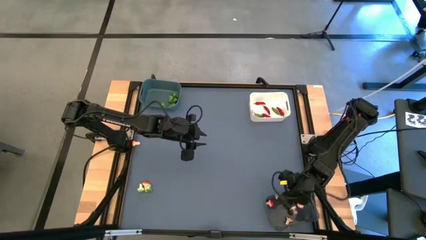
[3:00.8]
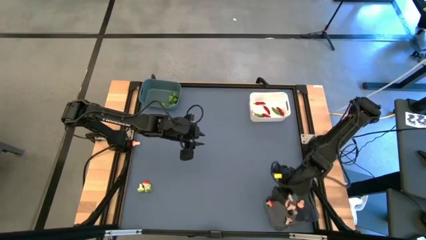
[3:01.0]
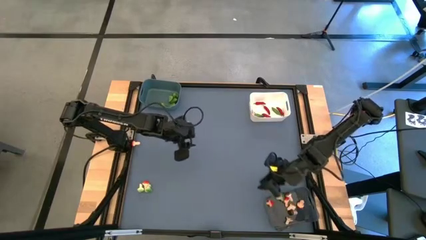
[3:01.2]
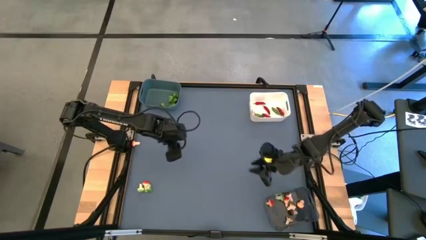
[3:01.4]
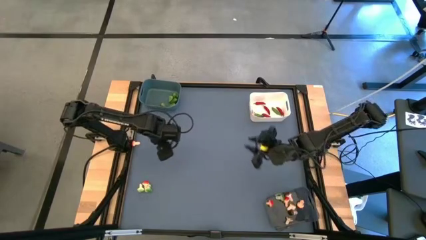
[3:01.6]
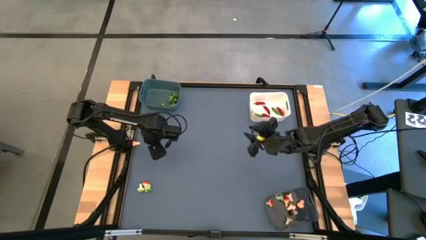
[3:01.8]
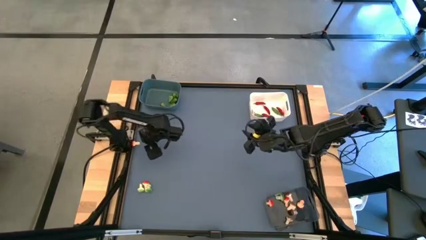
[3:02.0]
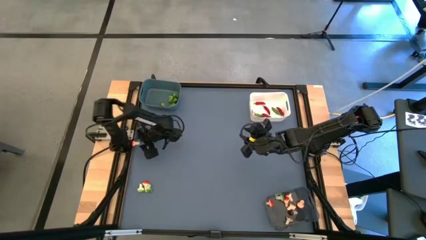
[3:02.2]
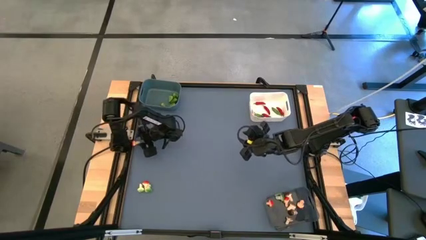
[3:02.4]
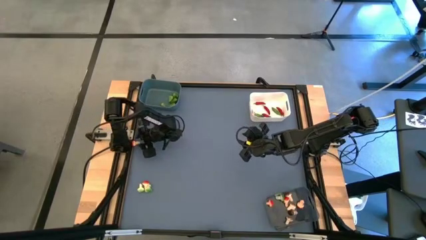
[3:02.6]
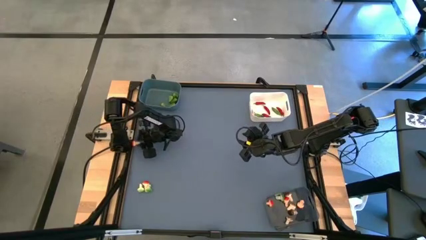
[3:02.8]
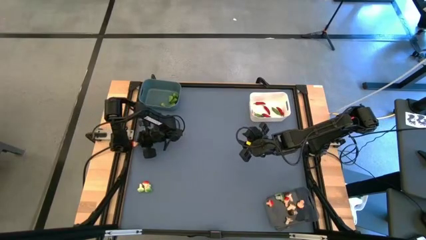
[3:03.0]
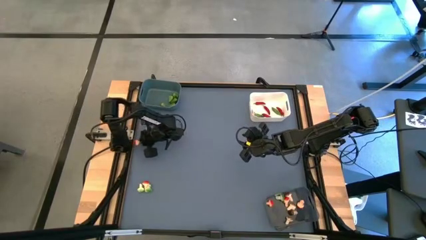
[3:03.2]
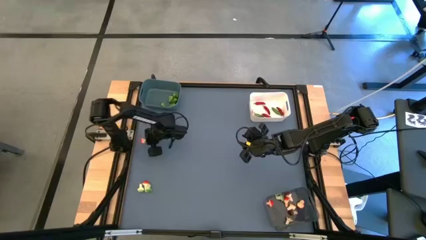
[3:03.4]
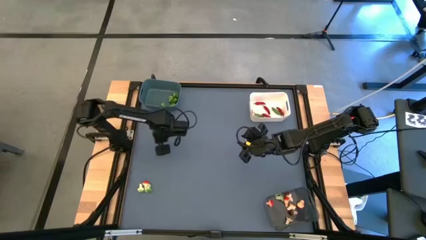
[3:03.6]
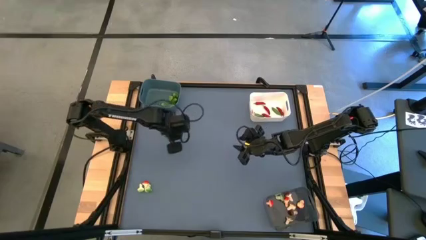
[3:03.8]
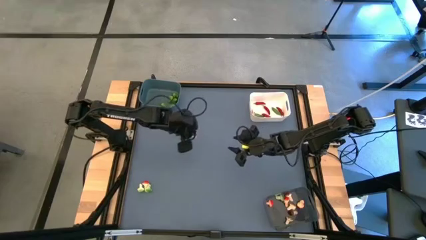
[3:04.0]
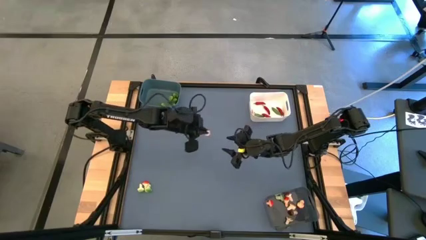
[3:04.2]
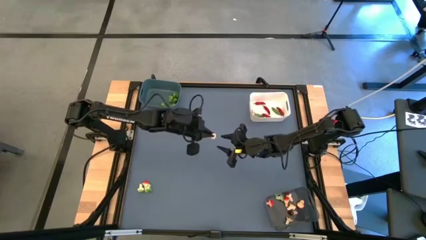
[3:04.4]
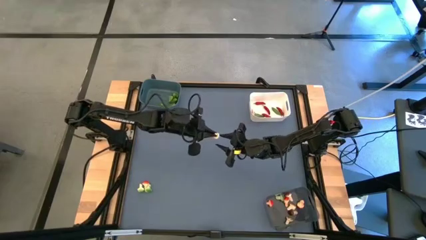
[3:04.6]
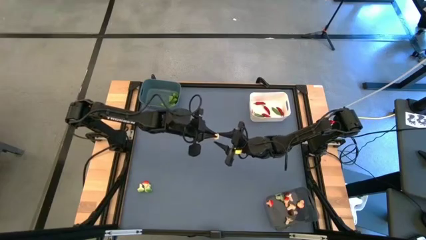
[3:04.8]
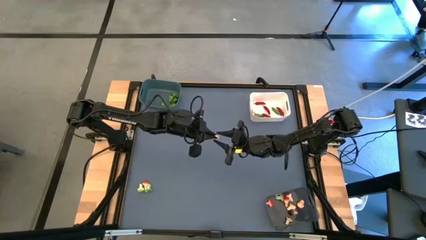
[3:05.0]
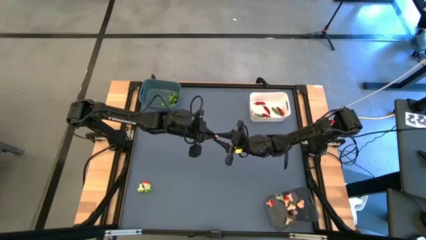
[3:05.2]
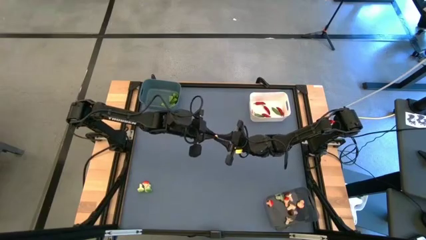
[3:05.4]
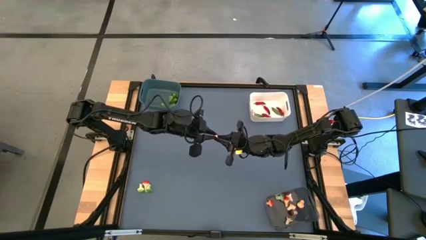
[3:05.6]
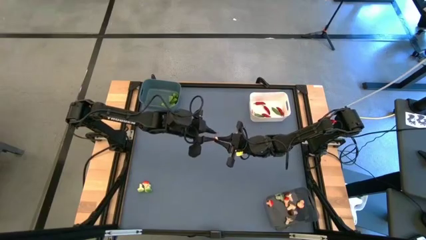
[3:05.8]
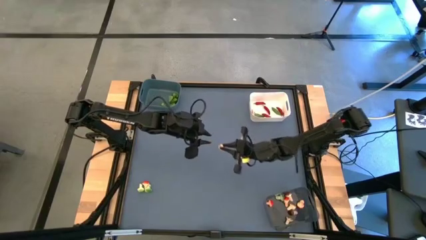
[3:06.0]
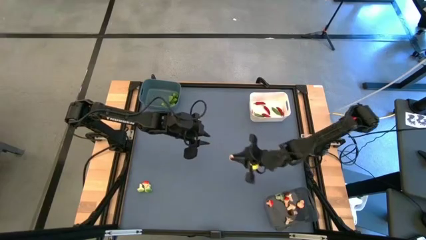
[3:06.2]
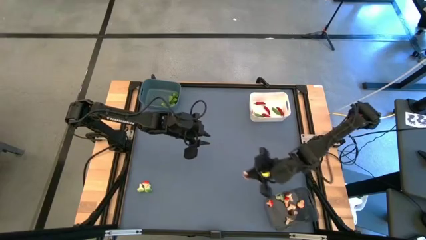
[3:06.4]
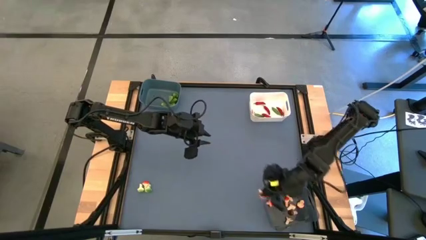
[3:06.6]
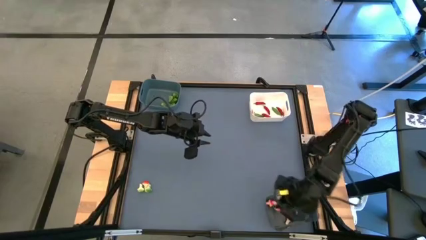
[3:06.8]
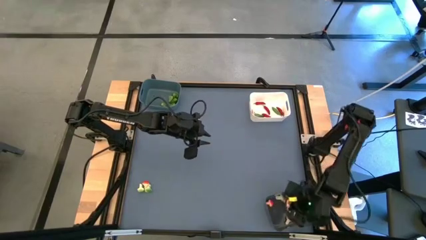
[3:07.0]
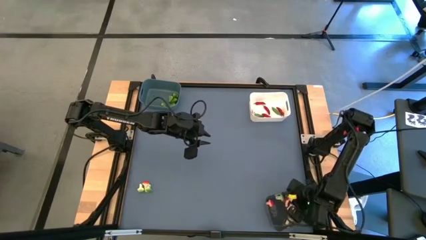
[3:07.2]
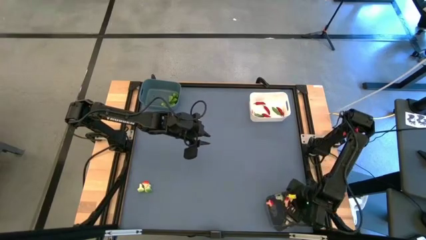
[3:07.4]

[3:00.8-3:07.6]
Task: Sort produce into baskets
Put the brown mushroom into black bin

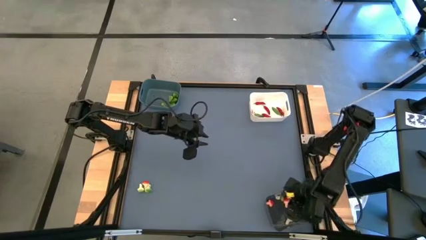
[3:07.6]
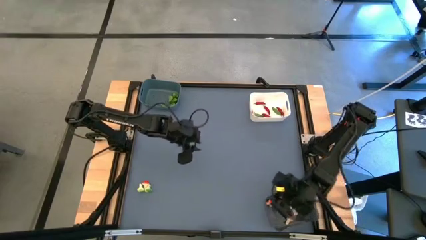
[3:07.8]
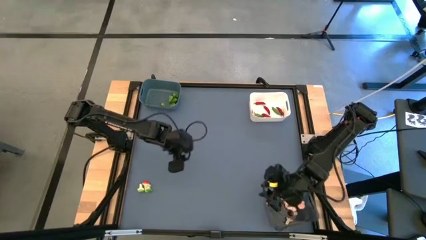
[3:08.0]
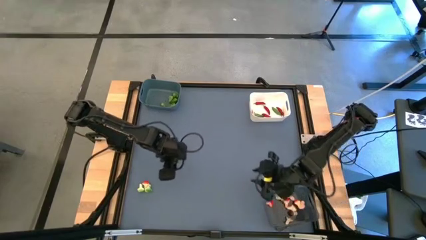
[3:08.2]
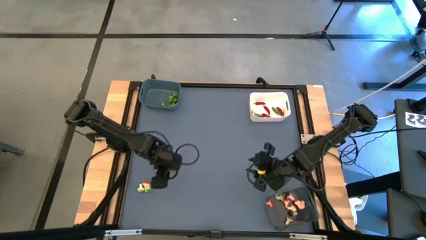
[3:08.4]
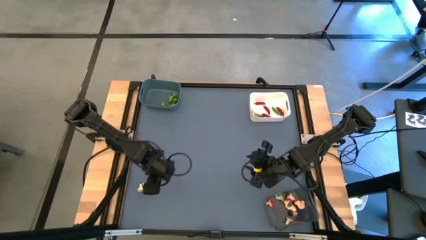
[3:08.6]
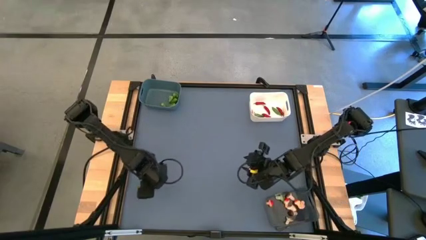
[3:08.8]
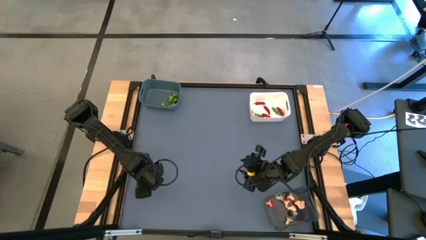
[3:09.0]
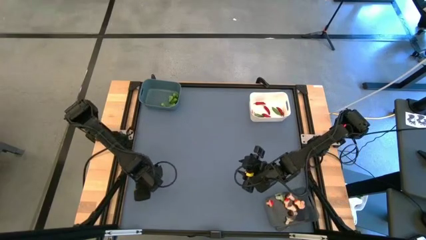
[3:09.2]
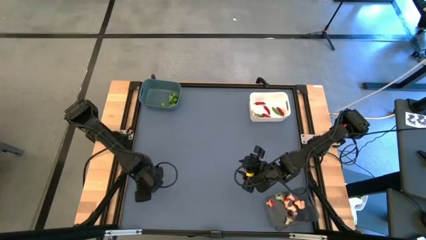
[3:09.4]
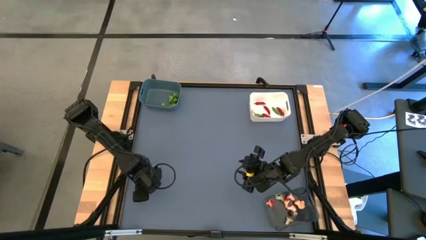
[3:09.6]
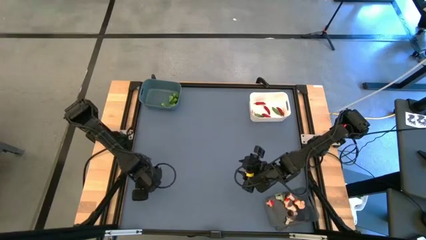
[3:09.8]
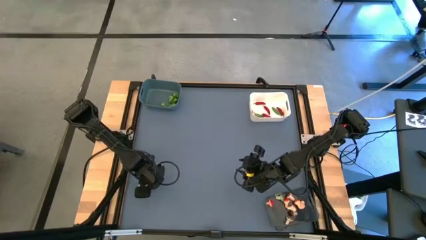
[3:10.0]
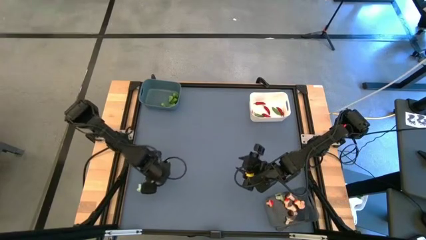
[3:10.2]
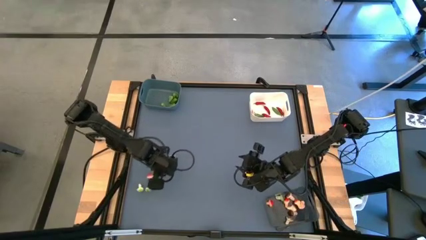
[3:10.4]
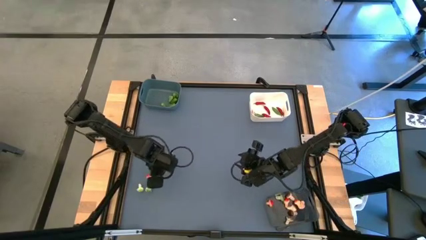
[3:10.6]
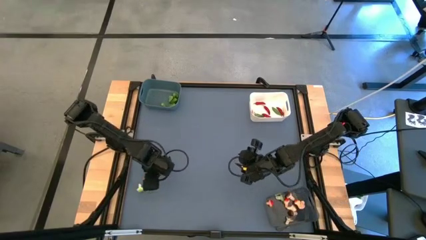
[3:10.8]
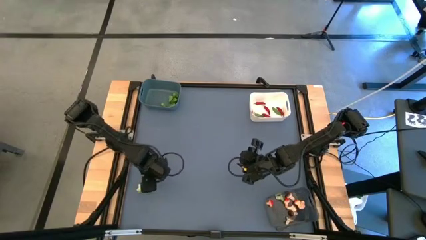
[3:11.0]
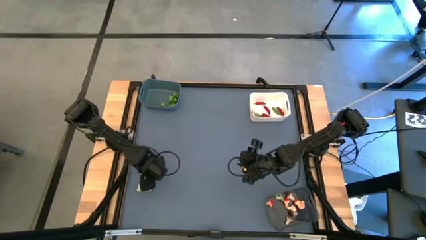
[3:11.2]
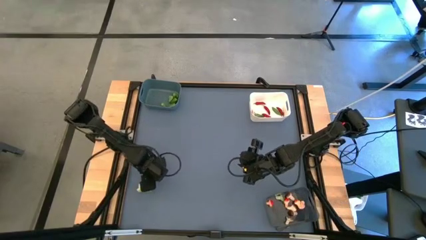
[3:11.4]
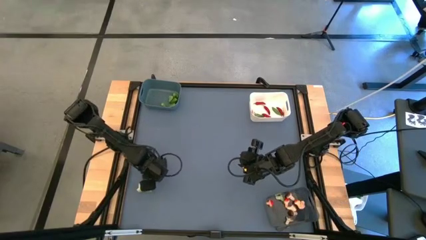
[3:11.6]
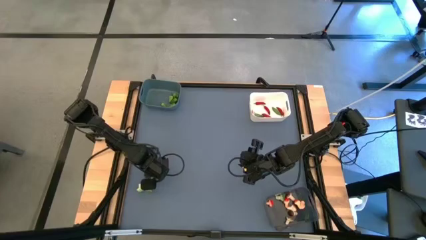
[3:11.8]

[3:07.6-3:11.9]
Put the brown mushroom into the into the black bin

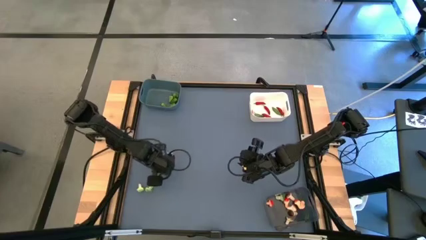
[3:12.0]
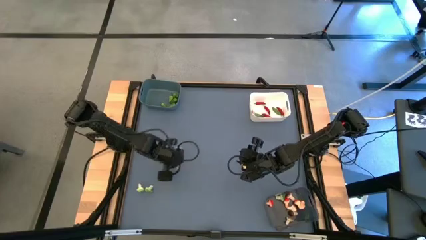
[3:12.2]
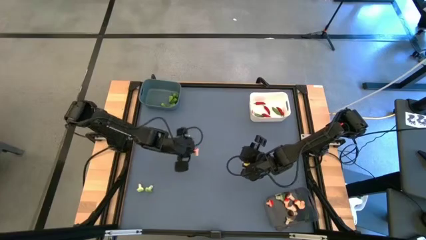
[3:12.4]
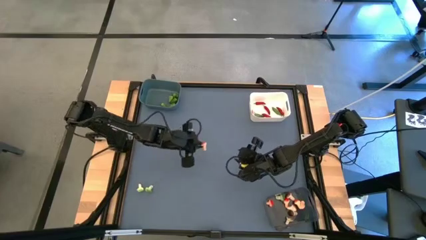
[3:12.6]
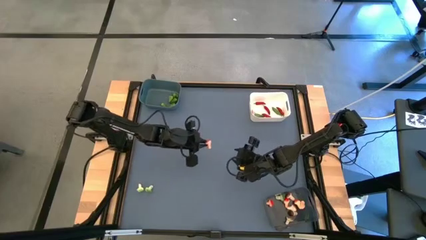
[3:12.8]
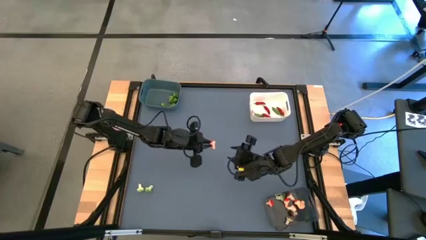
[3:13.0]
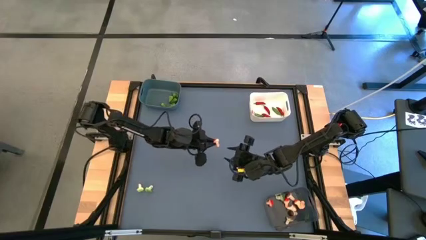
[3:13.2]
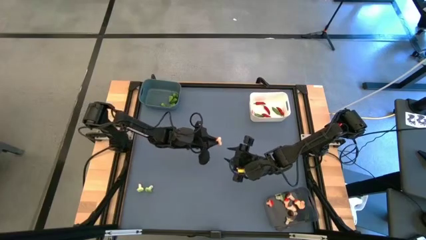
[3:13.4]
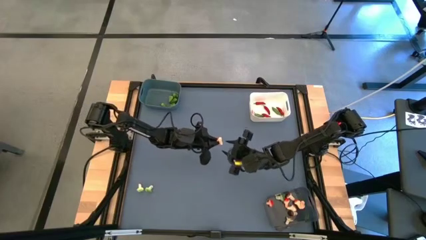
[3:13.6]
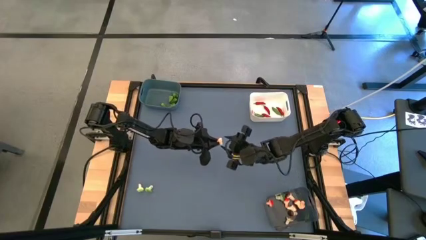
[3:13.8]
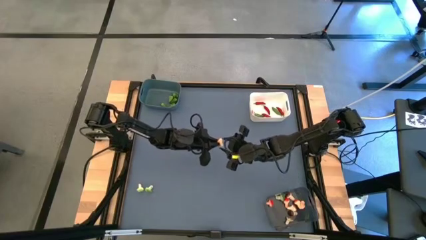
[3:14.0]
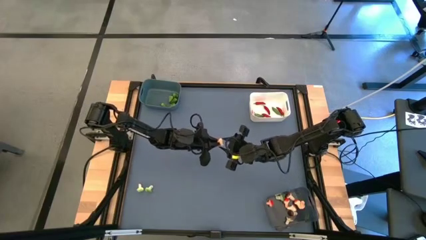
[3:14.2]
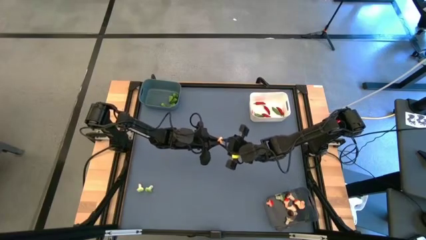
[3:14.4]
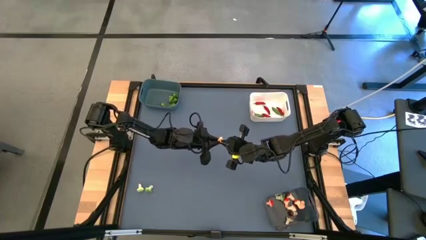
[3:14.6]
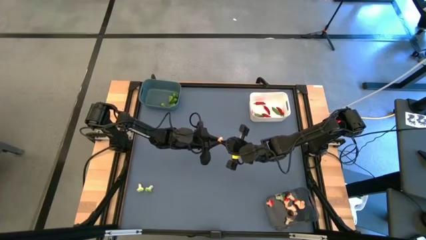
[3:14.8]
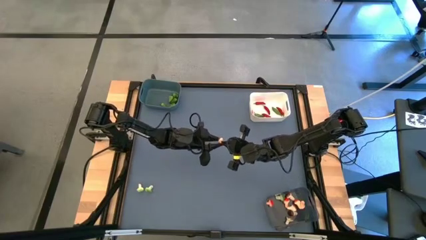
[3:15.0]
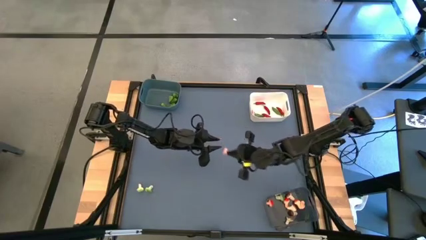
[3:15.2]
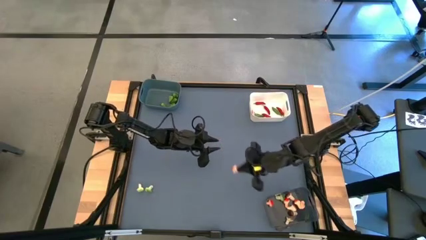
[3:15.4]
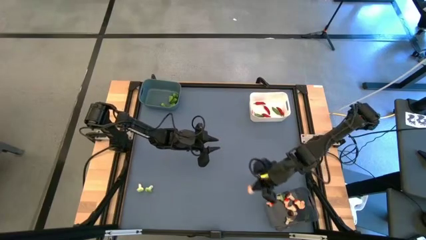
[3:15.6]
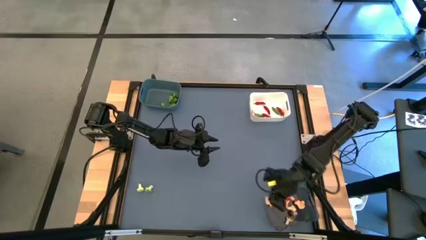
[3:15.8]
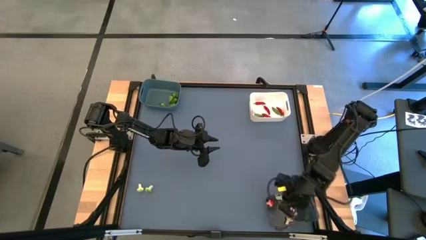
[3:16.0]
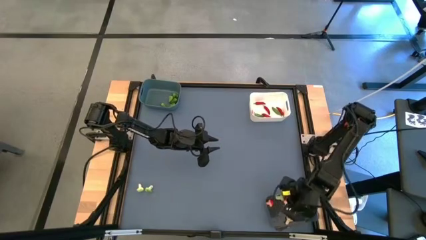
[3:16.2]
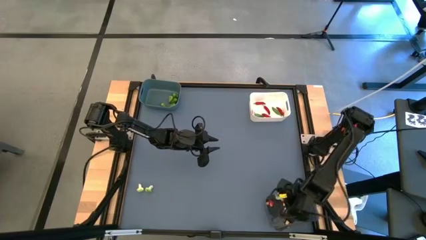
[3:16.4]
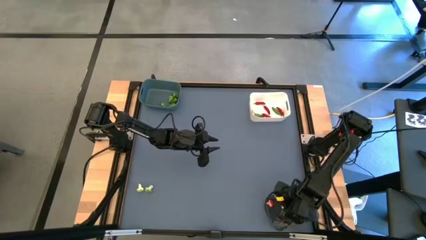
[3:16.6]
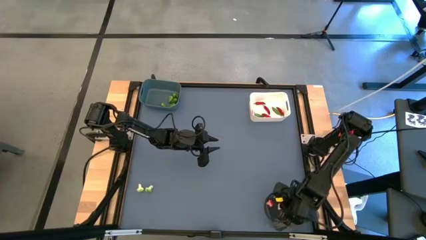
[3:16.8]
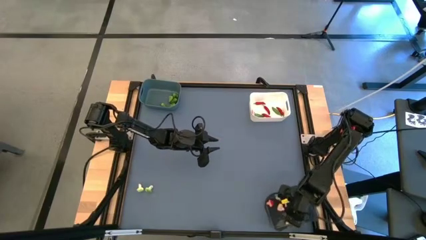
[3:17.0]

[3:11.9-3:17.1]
Put the brown mushroom into the black bin
